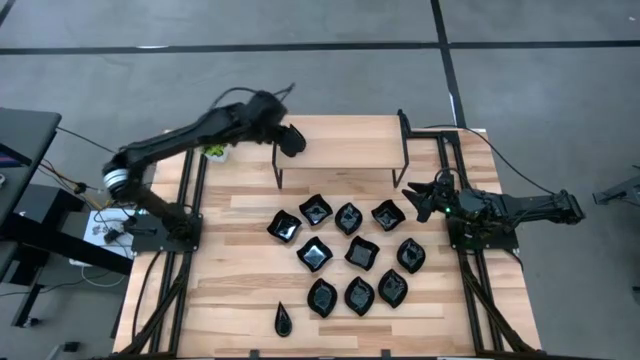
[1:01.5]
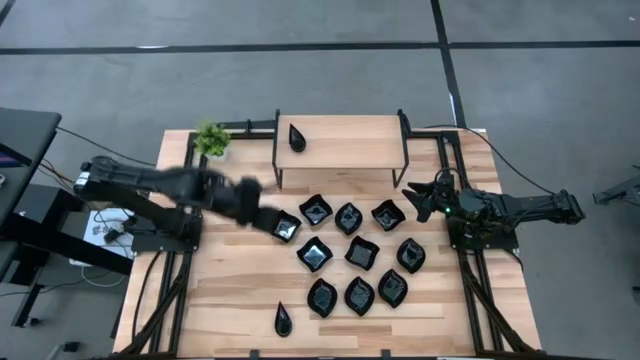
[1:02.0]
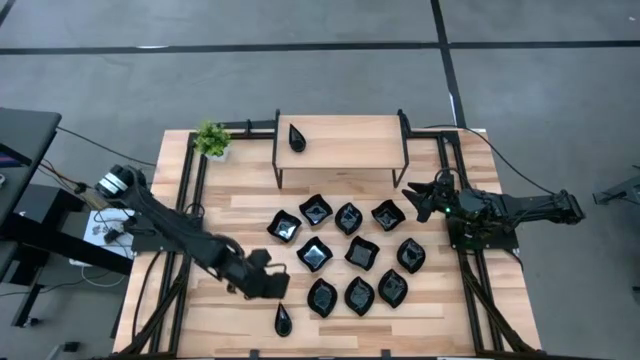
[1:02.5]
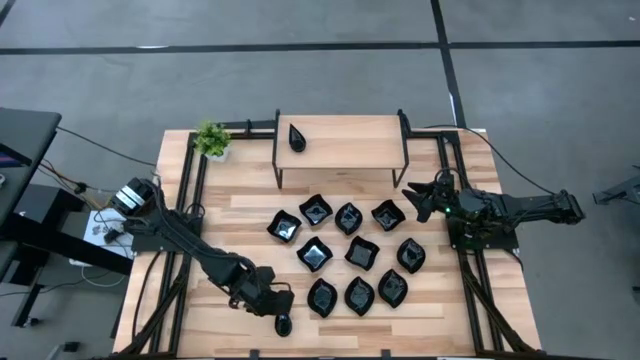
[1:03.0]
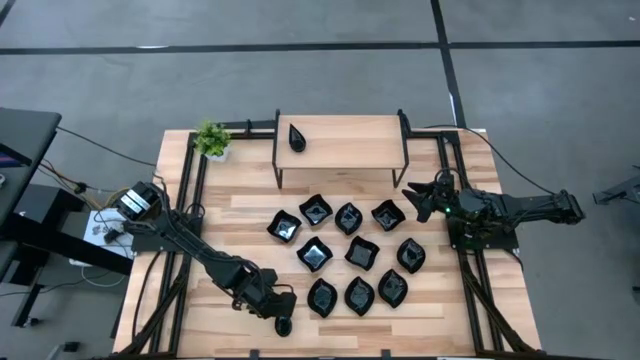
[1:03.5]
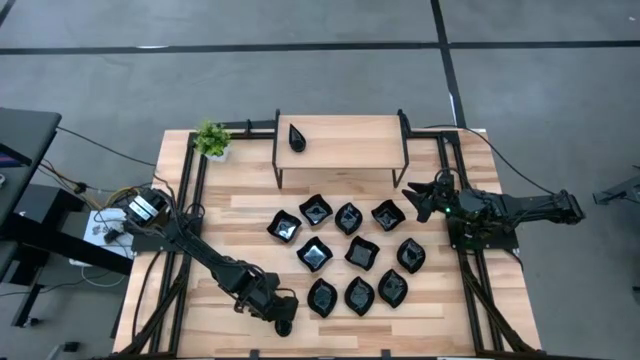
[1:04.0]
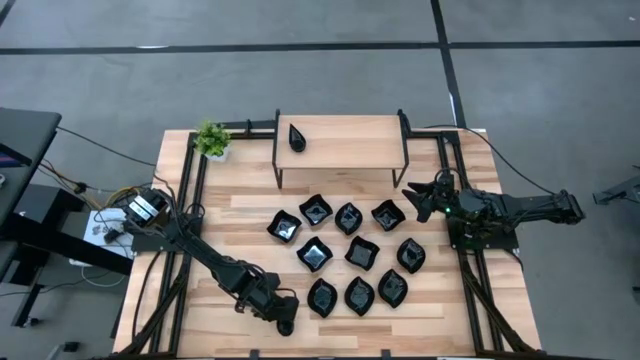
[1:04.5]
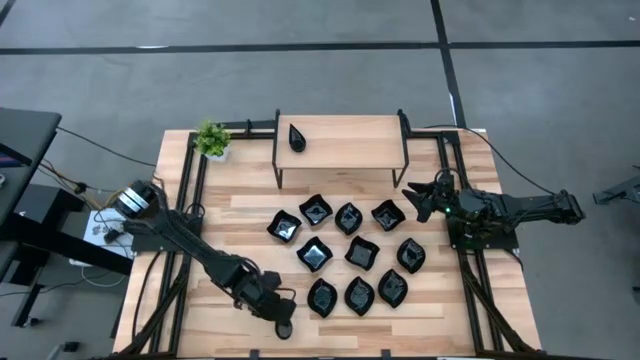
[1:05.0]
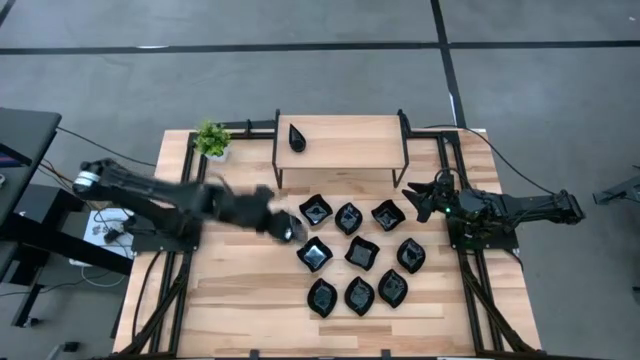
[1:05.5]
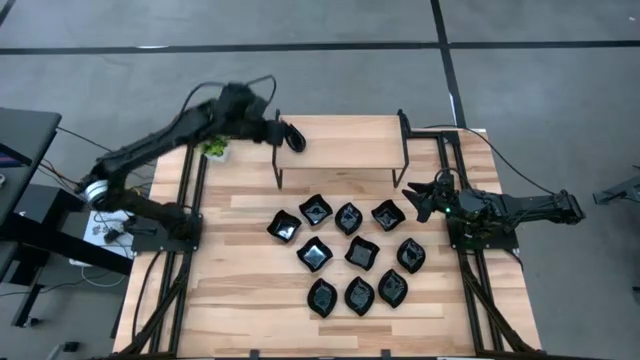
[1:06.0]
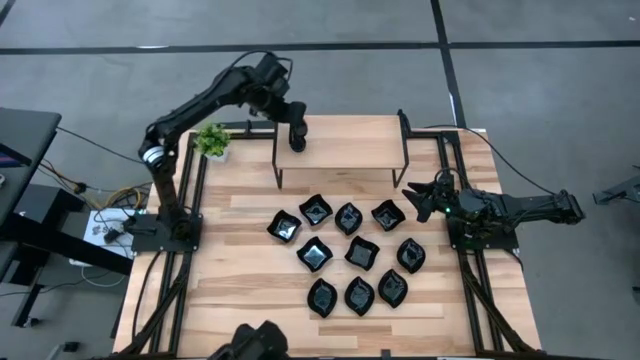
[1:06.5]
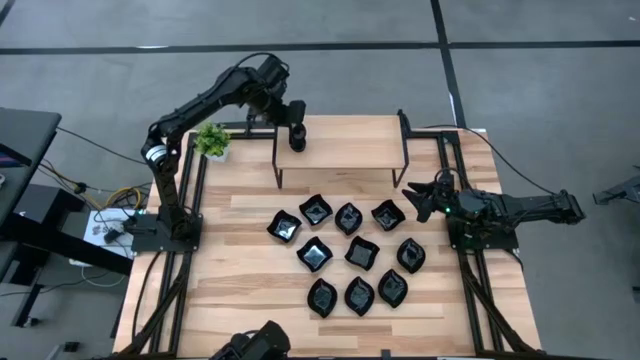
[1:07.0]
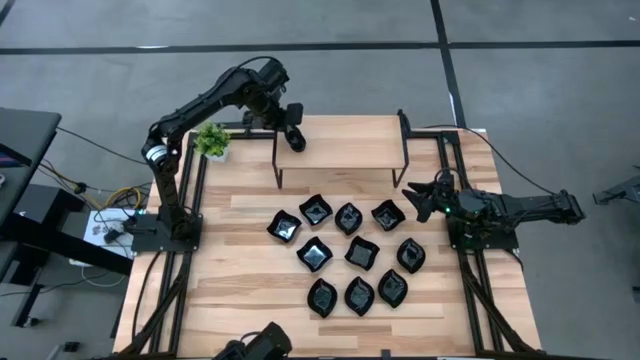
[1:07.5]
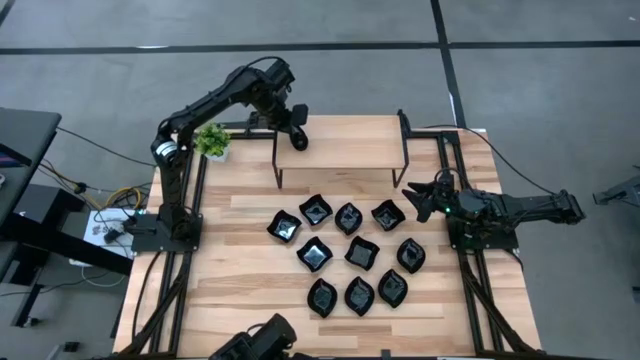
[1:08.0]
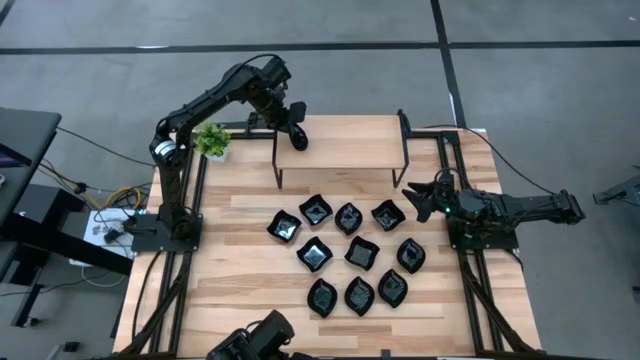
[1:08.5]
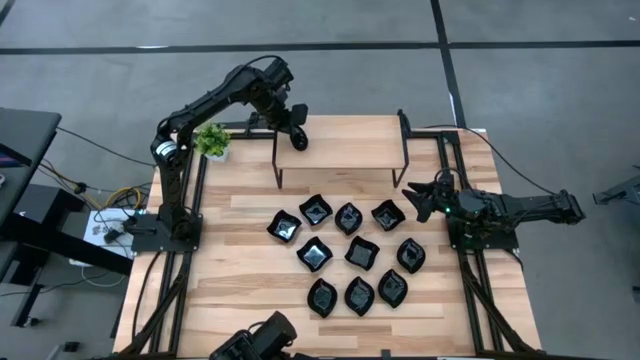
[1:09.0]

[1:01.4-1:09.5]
Task: Pick & Place Mini shaped plates
Stack the drop shaped plate on top of the drop shaped plates on the shelf

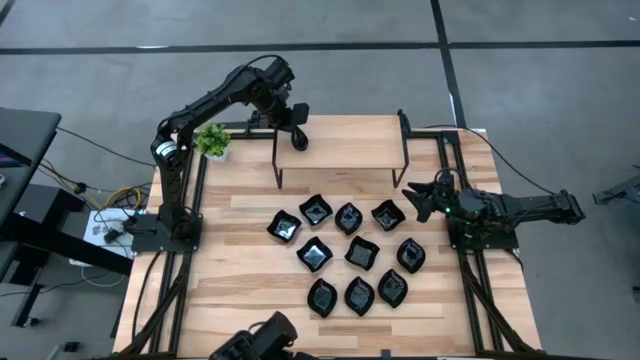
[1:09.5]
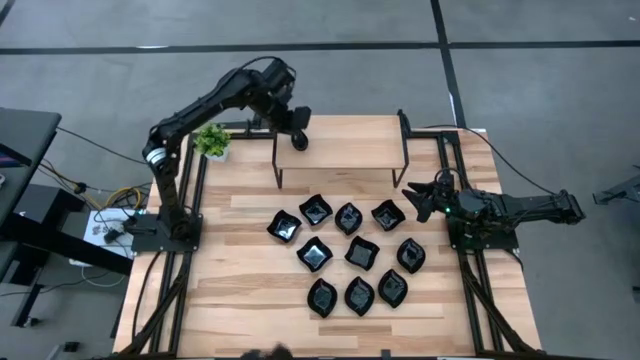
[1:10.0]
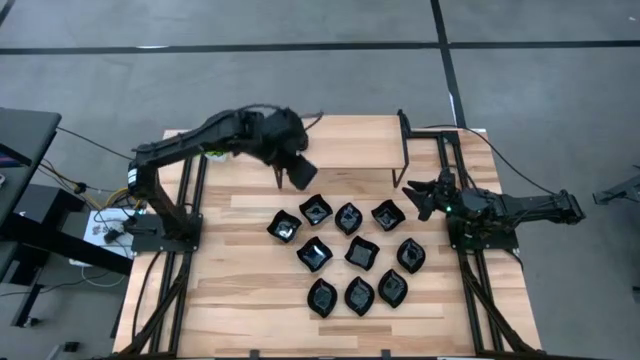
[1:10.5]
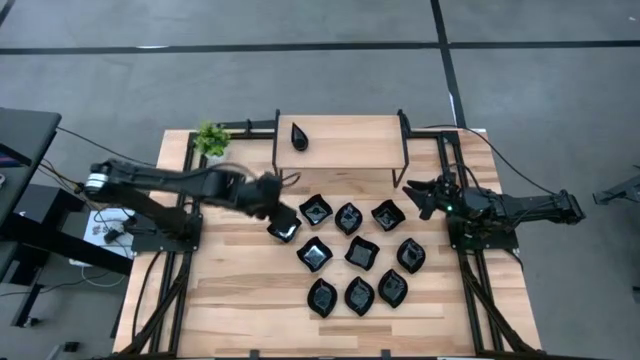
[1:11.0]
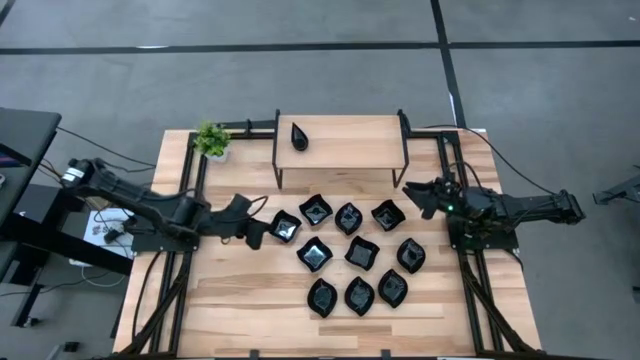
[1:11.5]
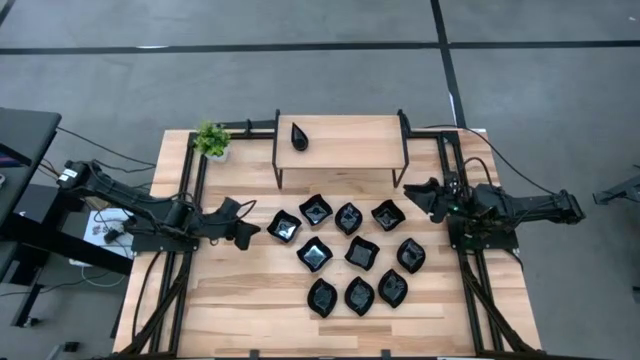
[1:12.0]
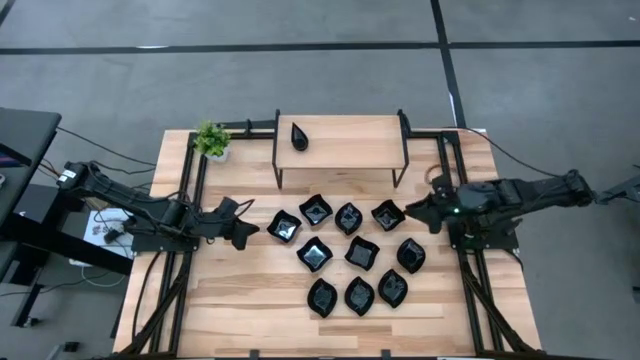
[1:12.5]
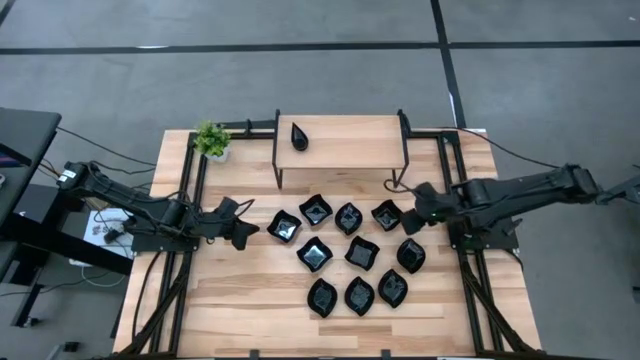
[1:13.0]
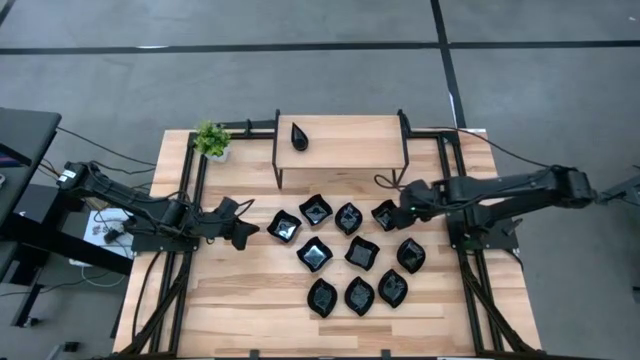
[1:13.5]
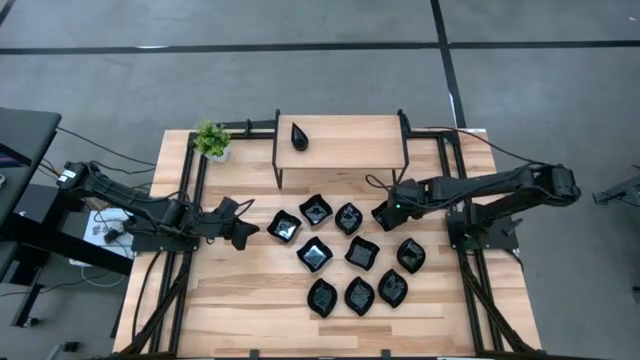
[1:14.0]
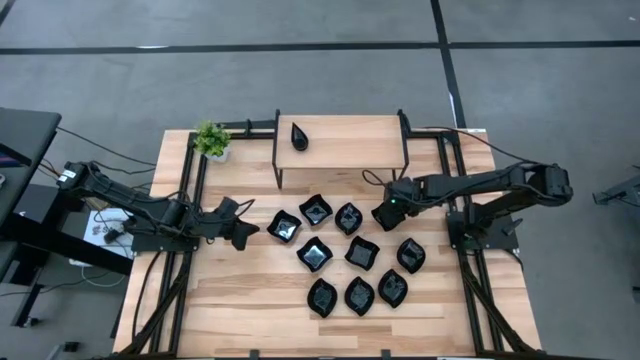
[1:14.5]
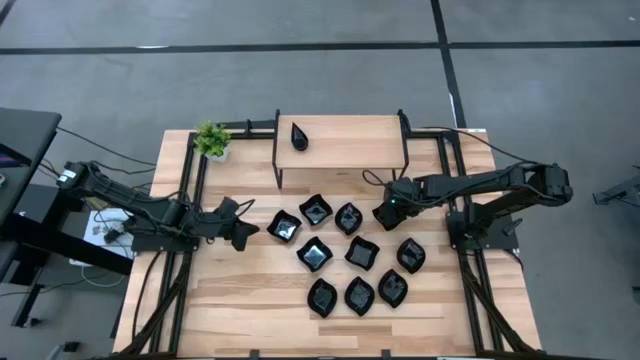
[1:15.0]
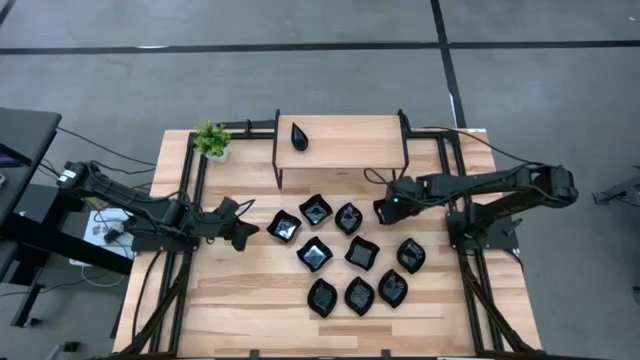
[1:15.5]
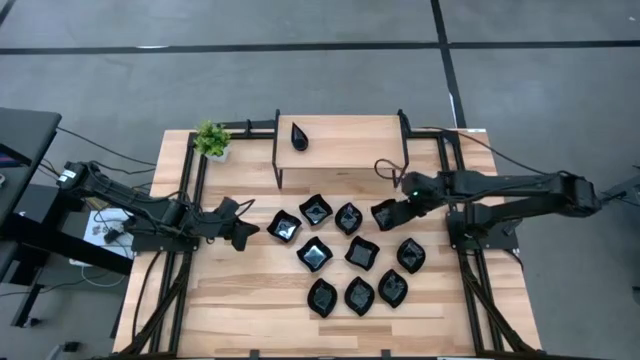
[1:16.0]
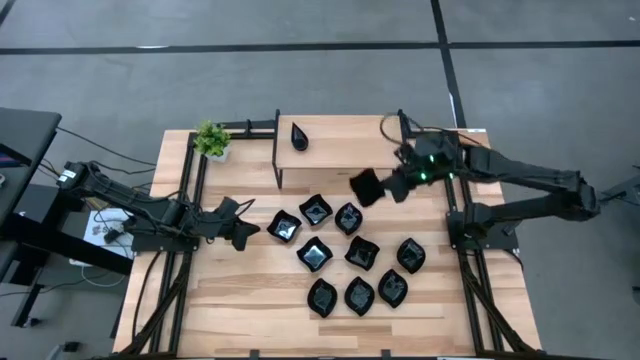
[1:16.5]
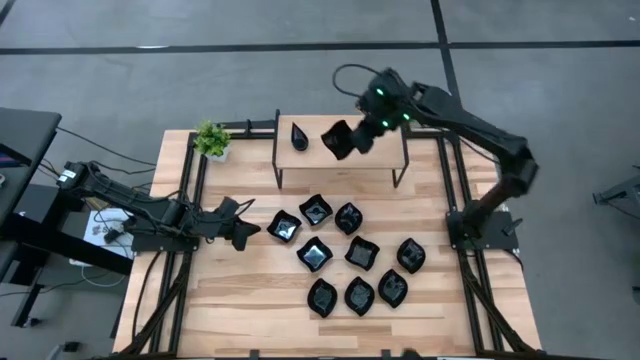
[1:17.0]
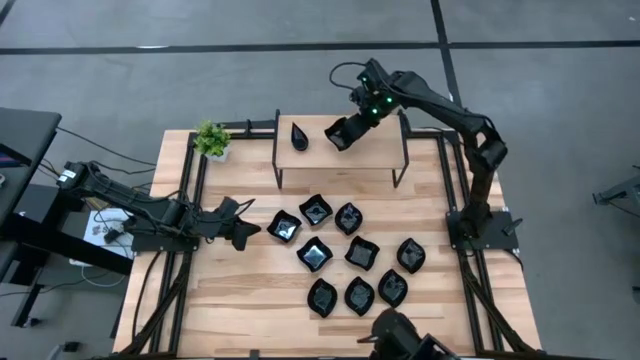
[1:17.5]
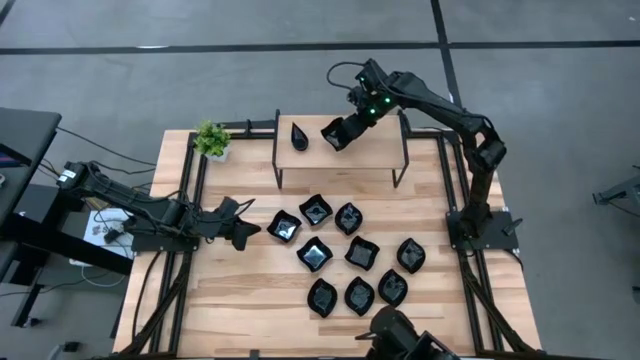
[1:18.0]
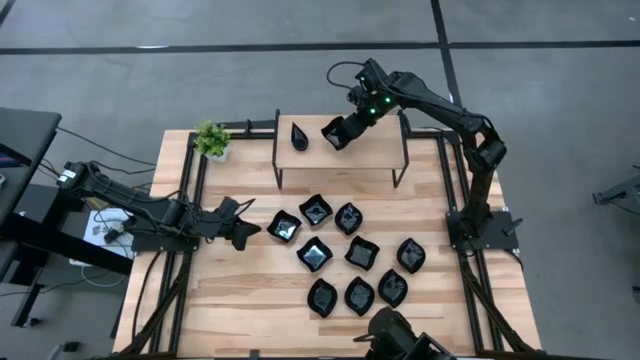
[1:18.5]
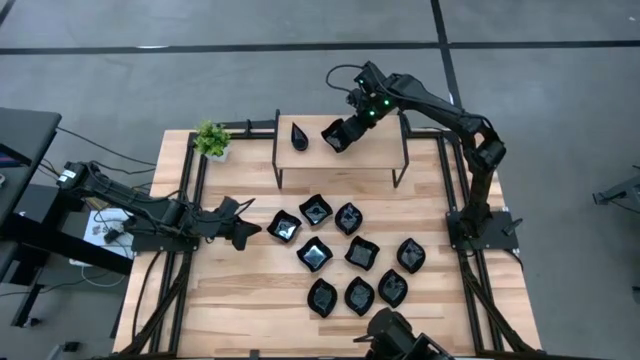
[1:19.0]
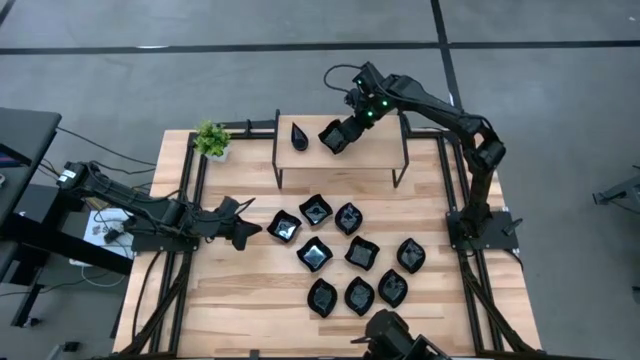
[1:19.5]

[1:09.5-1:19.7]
Put the distorted square plate on the shelf

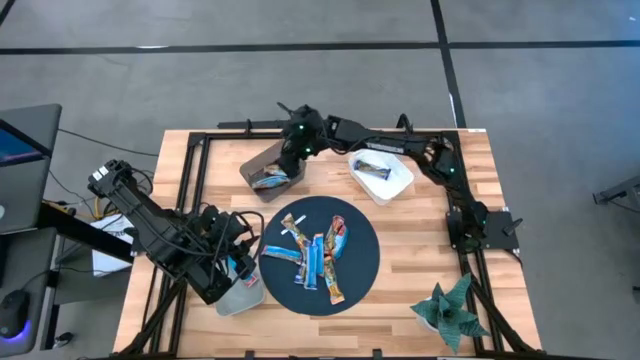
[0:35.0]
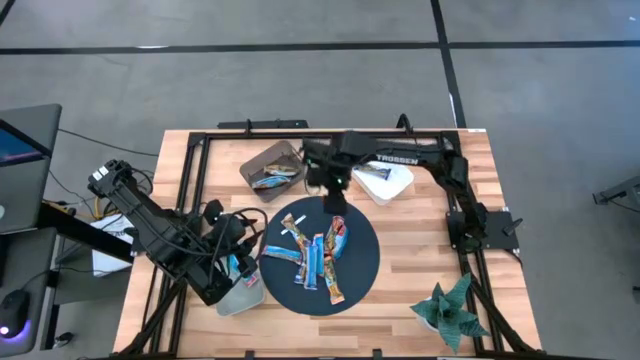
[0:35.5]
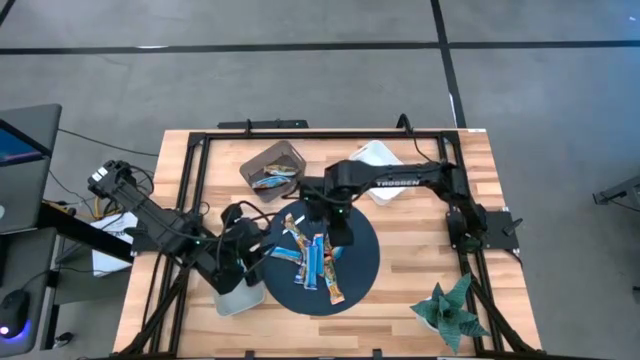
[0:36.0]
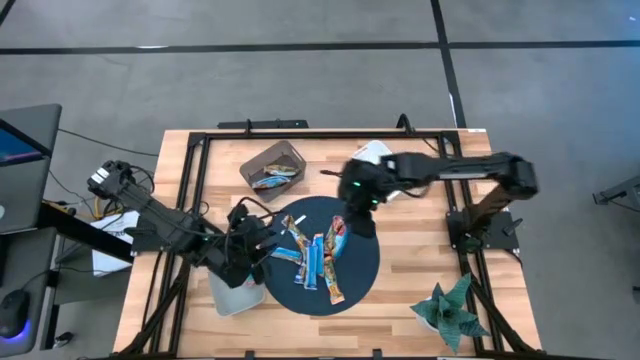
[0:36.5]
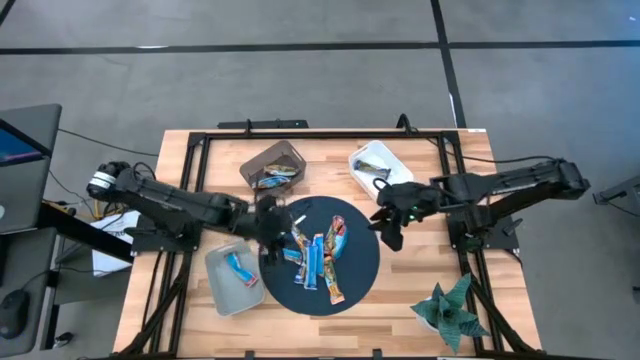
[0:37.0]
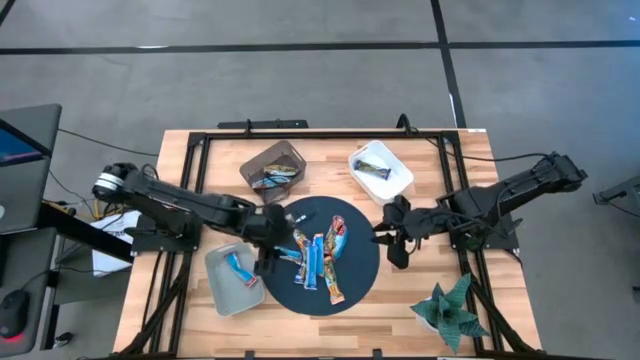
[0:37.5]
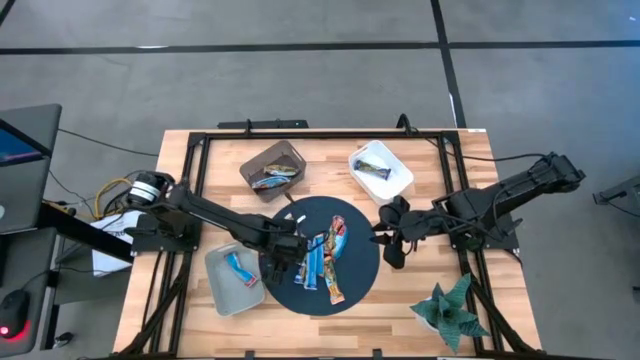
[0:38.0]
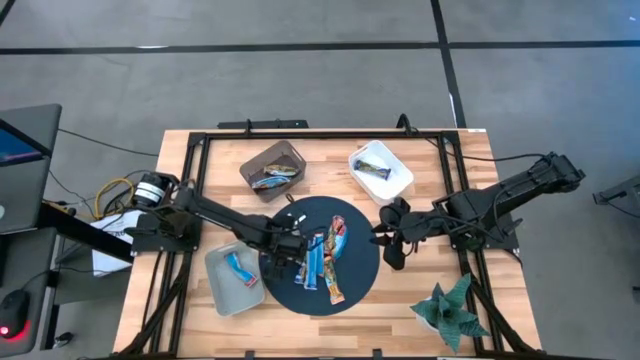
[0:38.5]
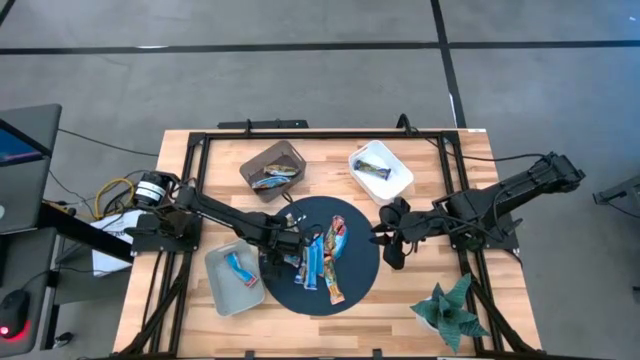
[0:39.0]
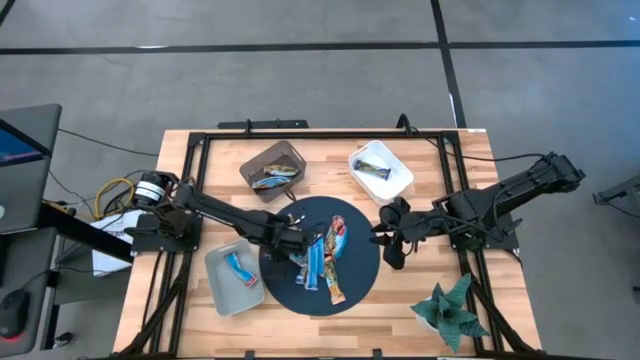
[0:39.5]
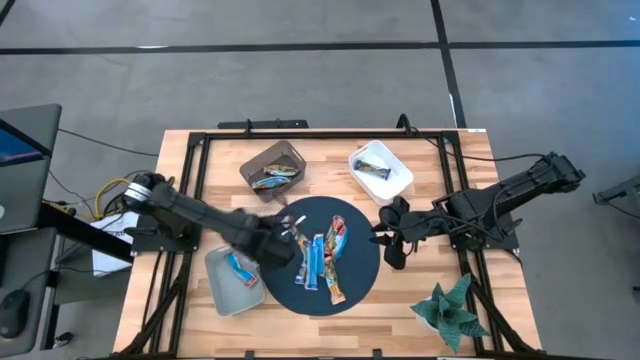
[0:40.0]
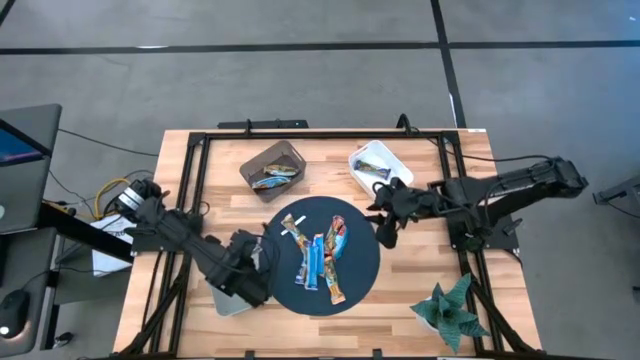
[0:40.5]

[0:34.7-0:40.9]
Task: Pick and place Granola Bars by type
Put the red granola bar into the gray bin
